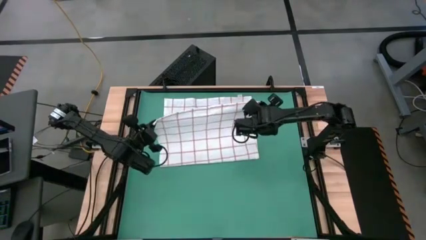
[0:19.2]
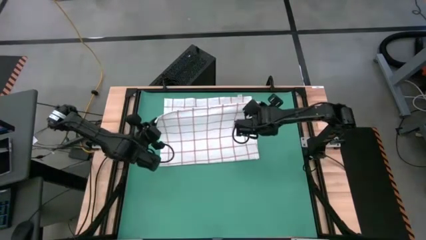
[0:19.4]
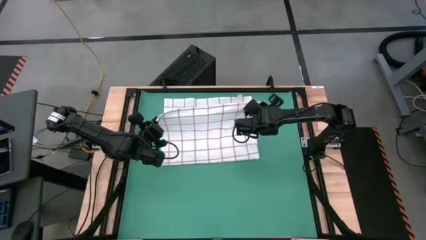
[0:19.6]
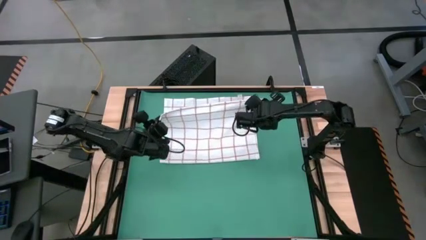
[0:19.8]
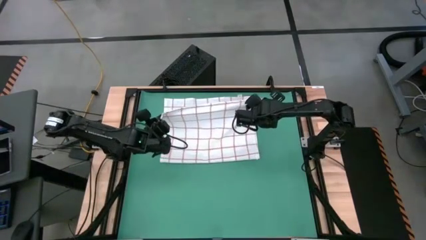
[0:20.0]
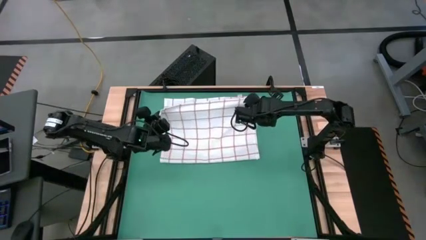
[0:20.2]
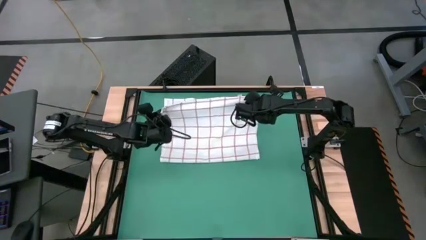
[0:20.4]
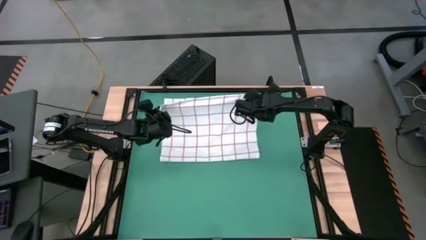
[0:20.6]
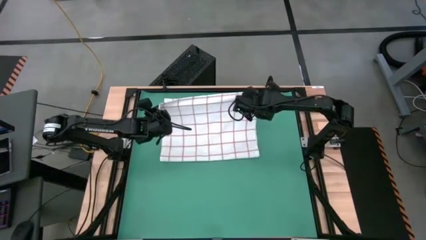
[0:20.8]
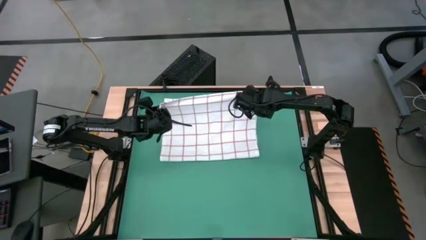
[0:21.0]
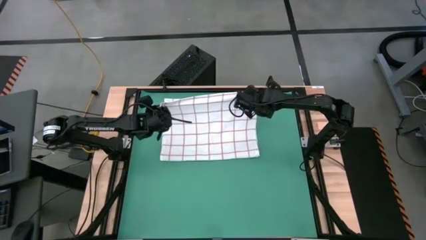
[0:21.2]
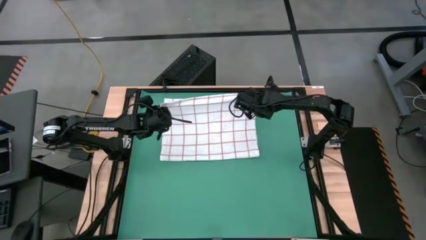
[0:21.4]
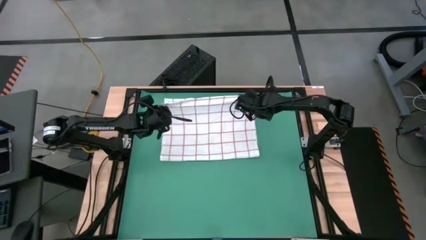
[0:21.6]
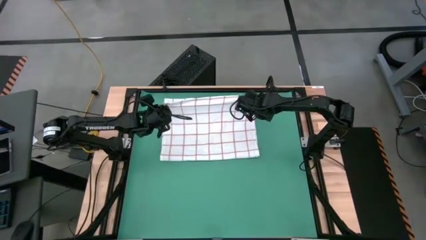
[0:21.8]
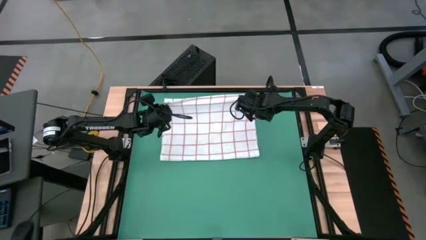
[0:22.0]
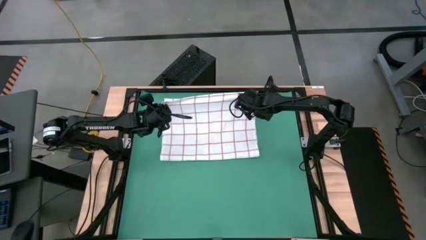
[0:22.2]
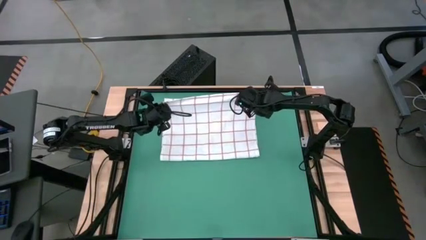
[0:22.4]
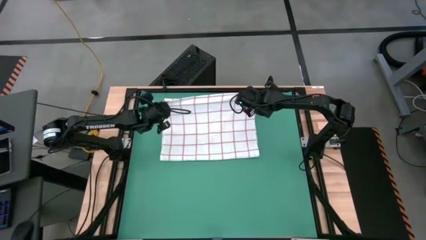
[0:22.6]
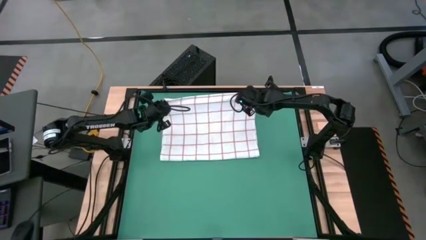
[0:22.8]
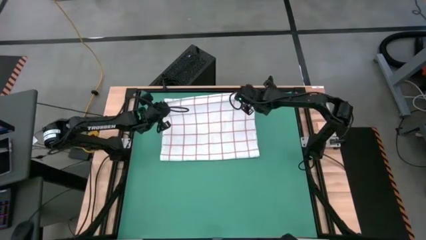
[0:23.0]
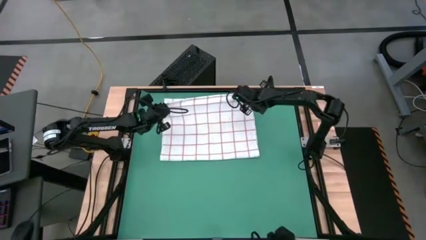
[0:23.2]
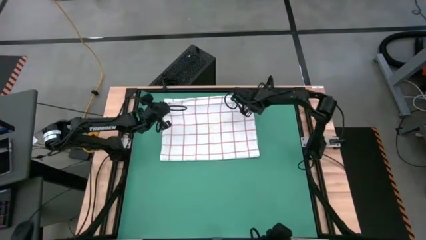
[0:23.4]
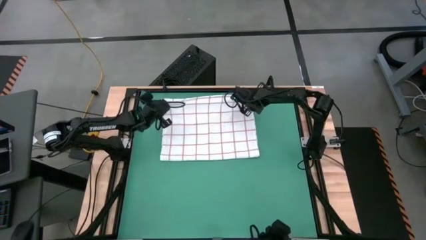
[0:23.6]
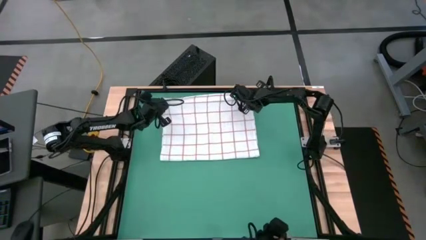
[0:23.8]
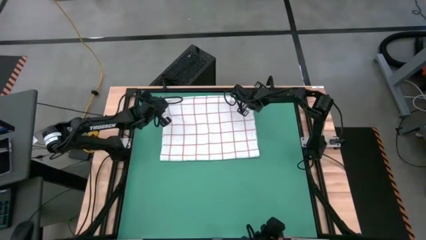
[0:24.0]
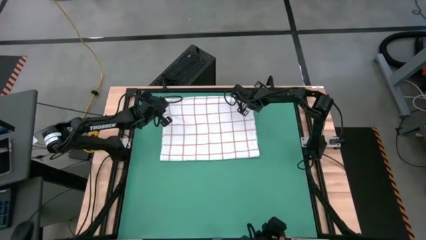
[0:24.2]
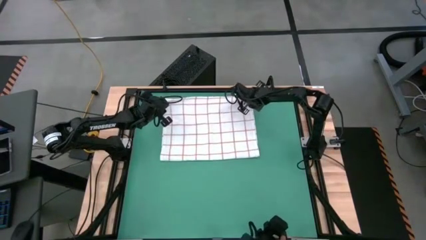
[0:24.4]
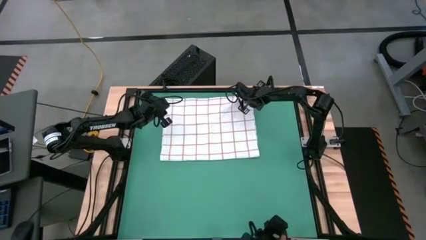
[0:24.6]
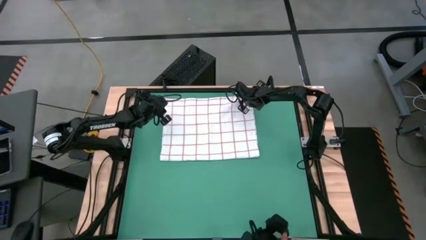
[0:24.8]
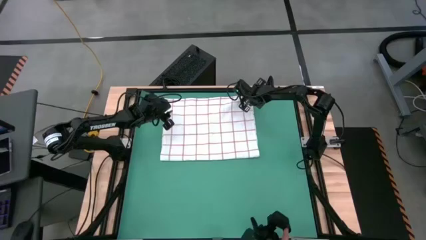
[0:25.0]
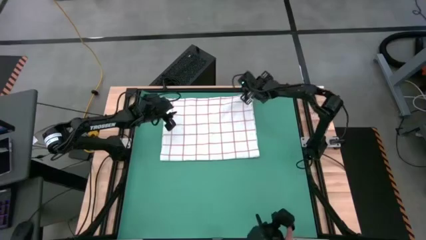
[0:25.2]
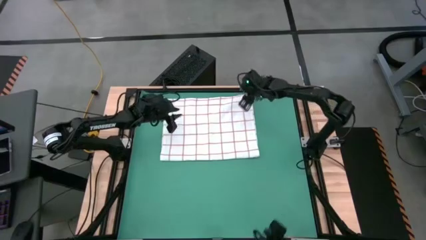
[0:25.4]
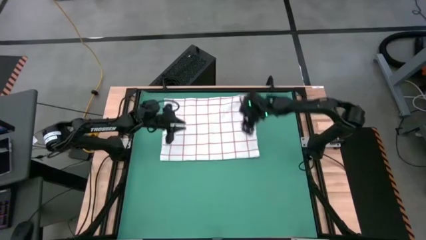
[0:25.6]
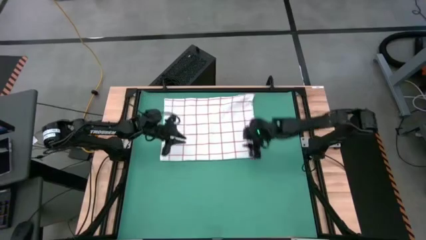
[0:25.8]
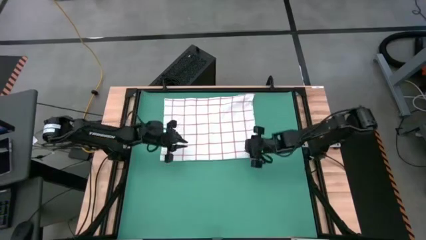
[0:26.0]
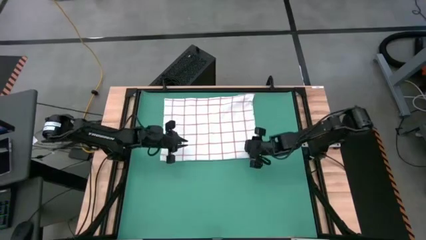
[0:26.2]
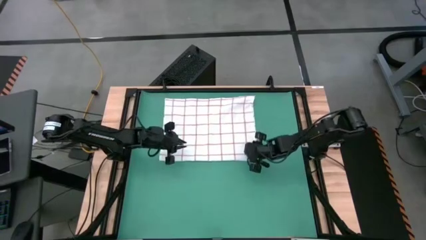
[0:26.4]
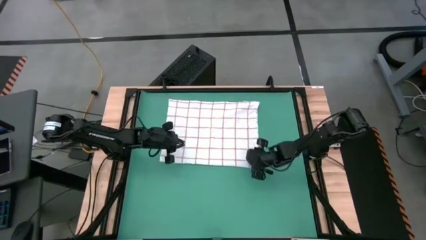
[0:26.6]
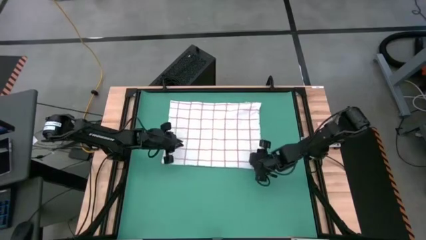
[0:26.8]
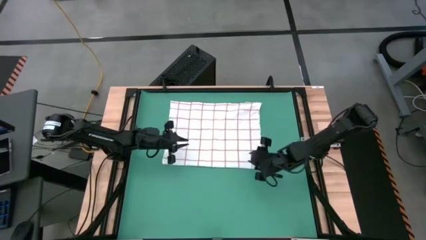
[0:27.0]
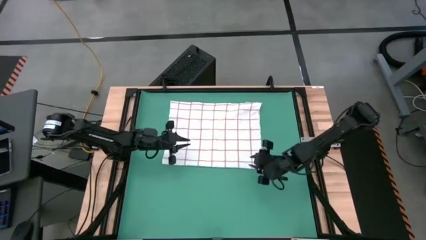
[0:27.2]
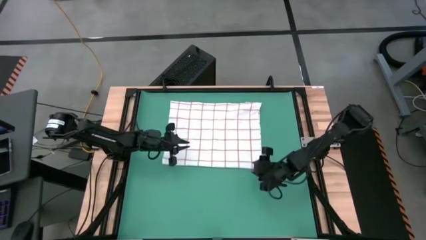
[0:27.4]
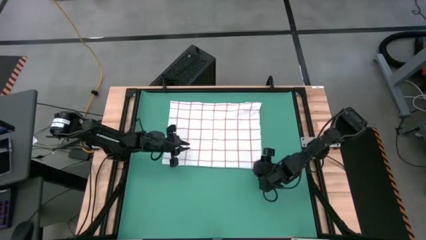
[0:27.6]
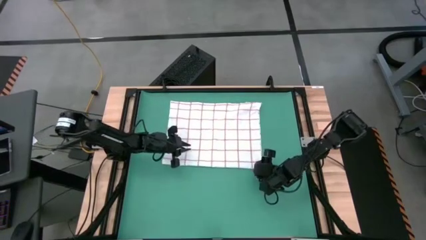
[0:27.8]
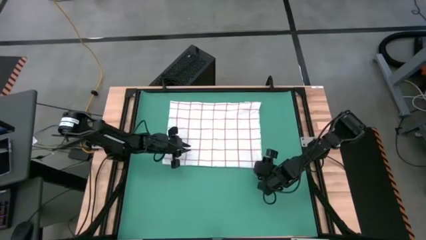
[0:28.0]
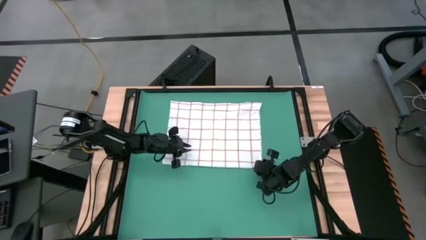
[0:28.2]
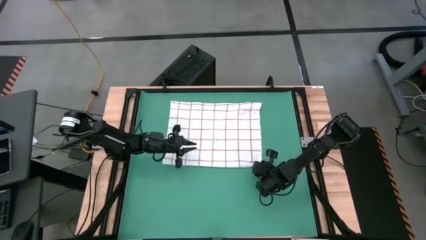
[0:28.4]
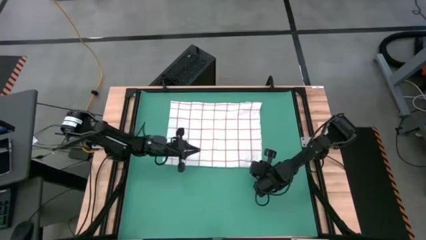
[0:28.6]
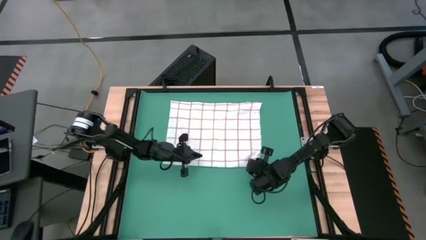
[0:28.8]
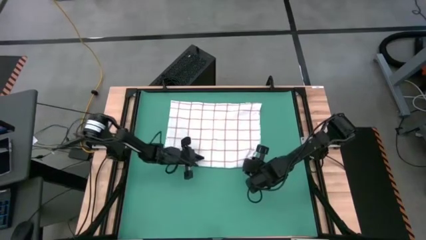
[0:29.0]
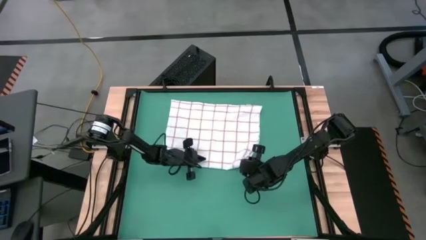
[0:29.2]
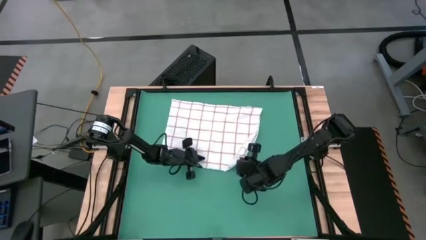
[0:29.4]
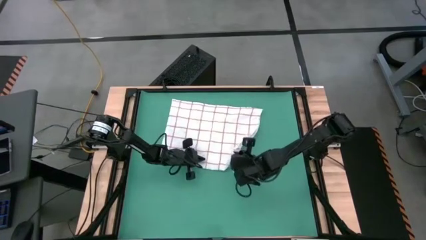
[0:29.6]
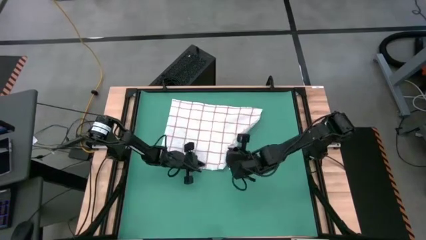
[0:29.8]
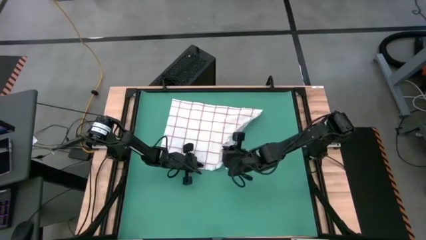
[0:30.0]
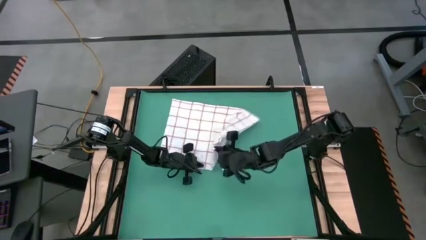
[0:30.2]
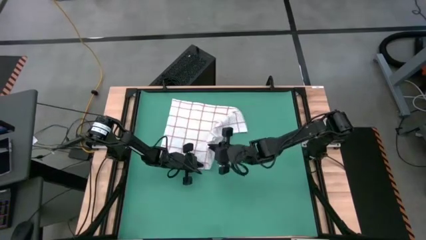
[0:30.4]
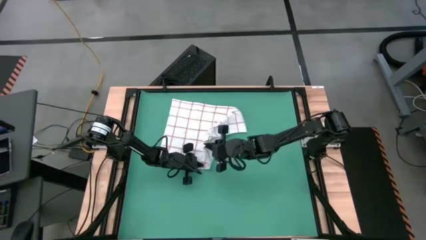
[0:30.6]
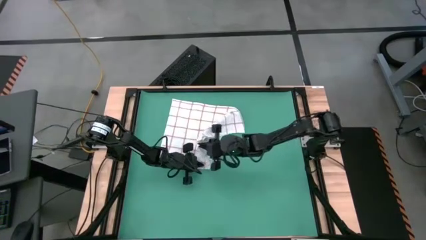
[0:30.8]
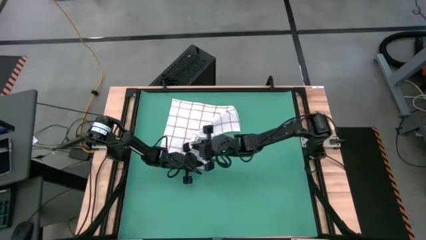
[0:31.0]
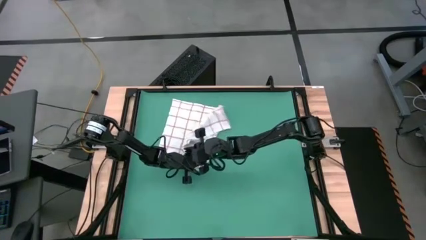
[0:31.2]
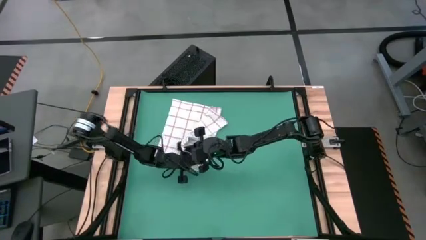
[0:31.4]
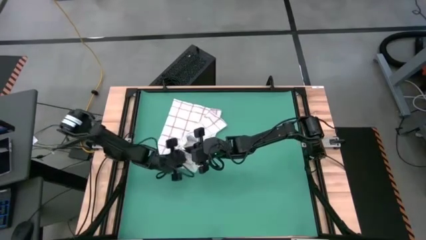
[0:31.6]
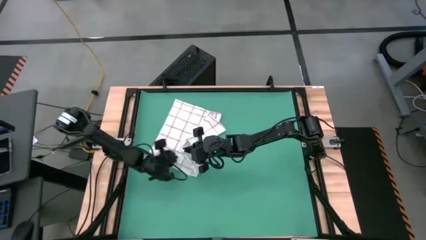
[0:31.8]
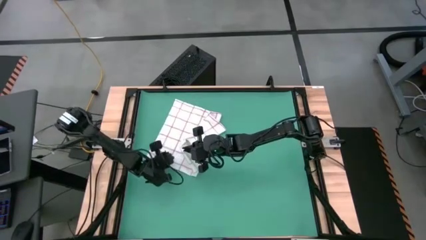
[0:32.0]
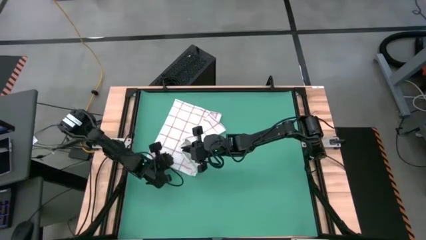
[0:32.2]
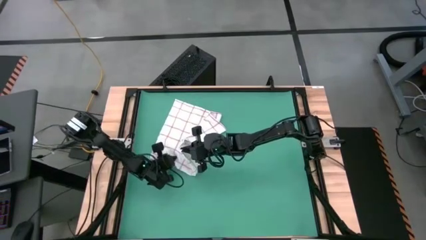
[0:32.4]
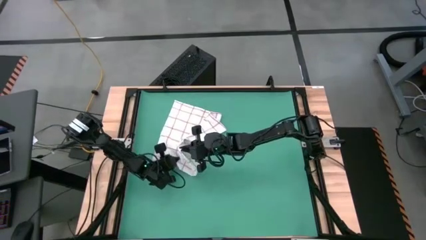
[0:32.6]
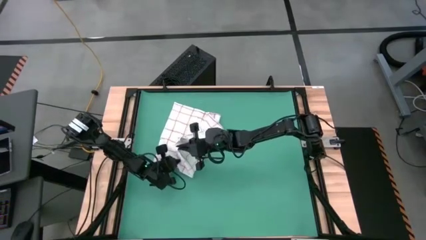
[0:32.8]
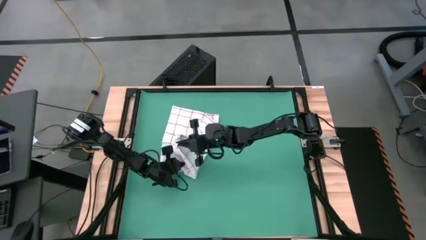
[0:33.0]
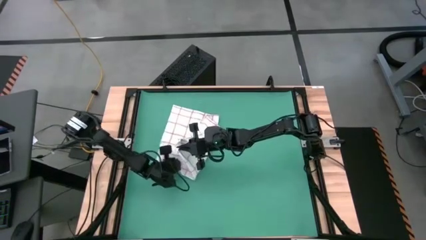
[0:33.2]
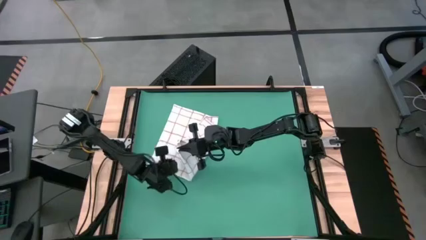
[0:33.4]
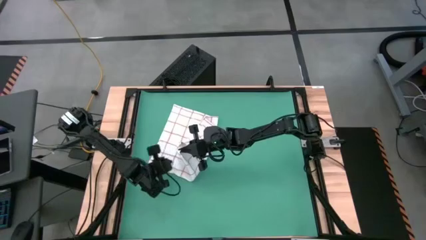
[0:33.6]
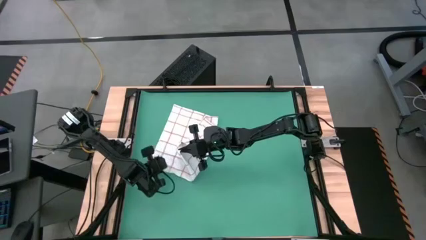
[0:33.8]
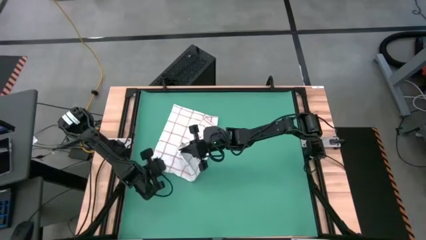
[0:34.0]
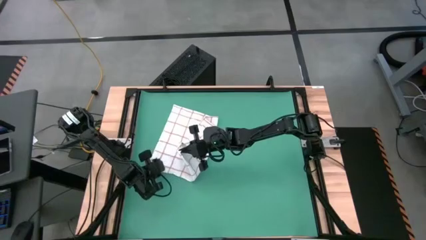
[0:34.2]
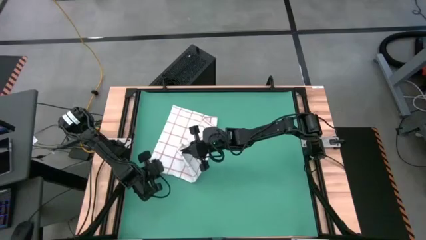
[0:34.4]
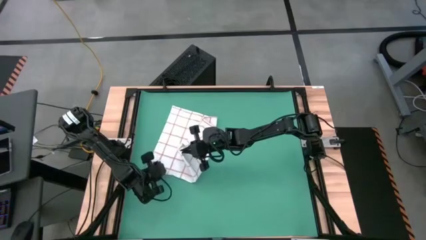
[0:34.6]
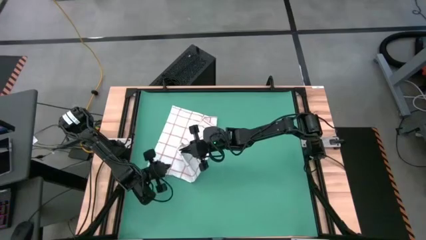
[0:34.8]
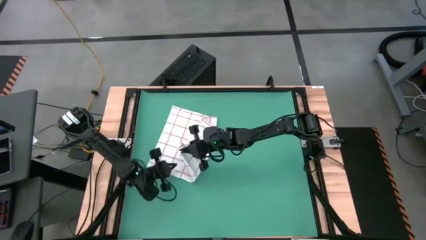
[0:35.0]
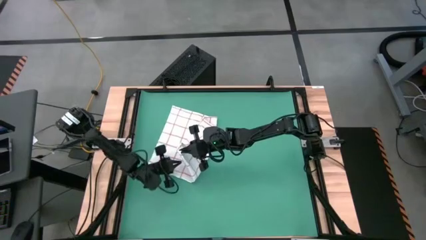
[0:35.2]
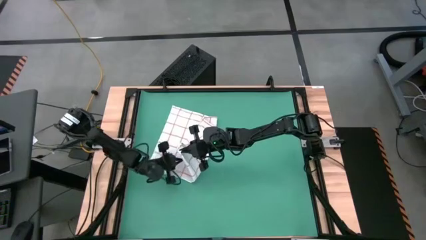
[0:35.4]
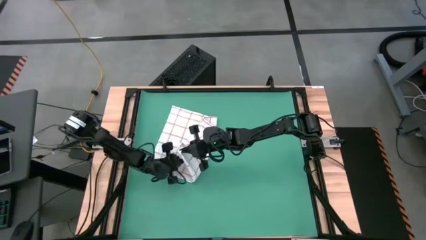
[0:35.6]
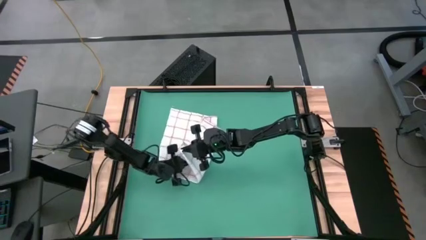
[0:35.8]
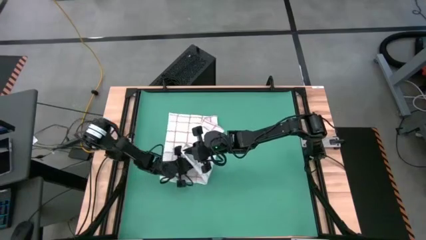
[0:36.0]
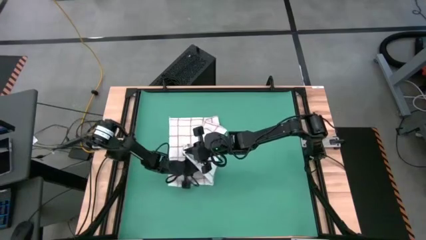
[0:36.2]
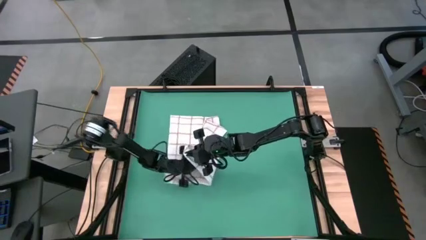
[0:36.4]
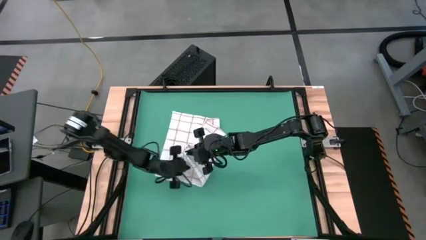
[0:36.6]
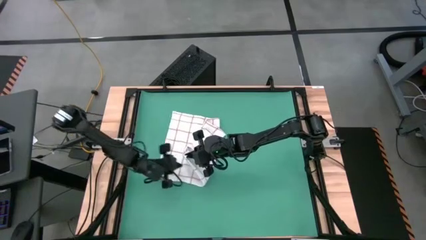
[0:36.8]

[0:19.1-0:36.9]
Task: Roll towel
Fold the white towel
